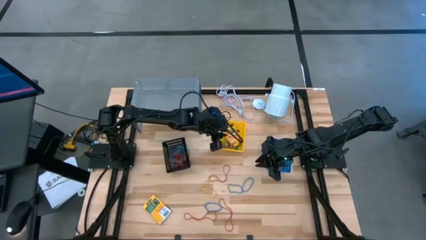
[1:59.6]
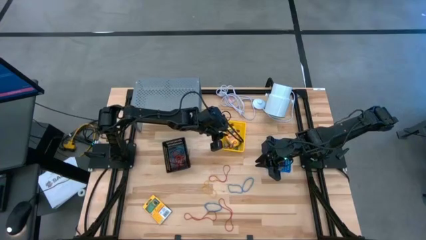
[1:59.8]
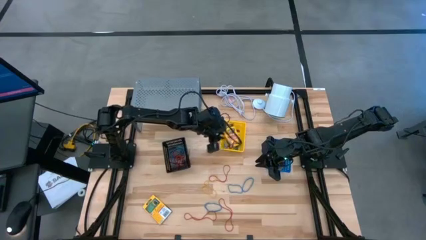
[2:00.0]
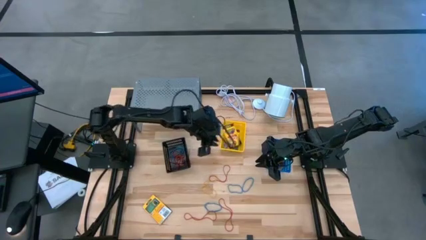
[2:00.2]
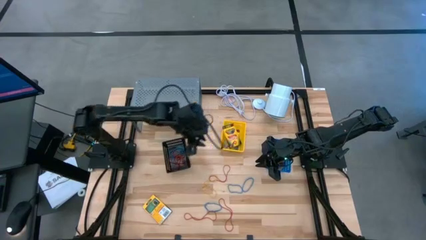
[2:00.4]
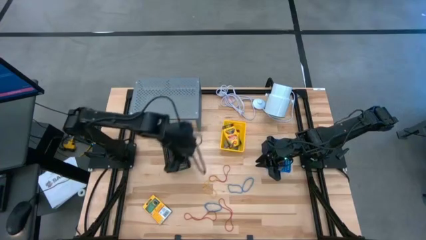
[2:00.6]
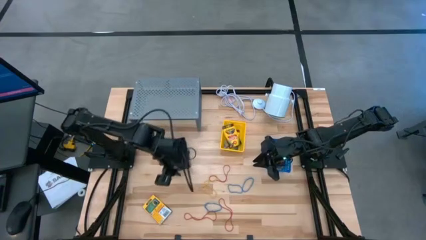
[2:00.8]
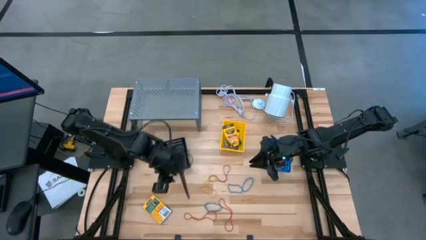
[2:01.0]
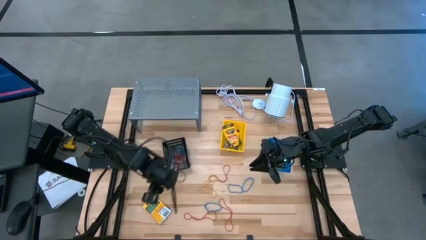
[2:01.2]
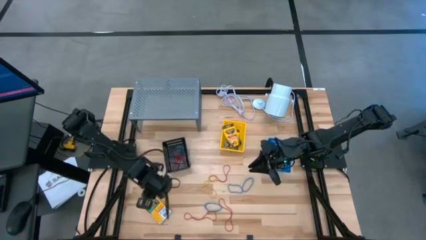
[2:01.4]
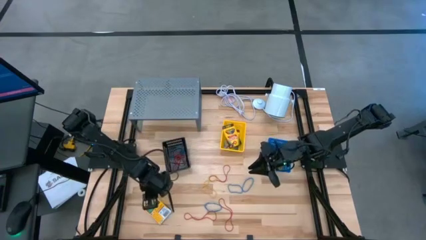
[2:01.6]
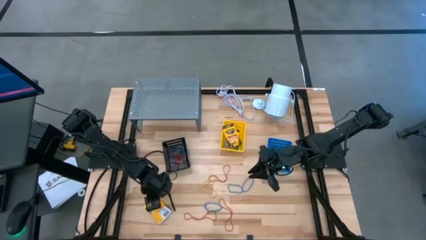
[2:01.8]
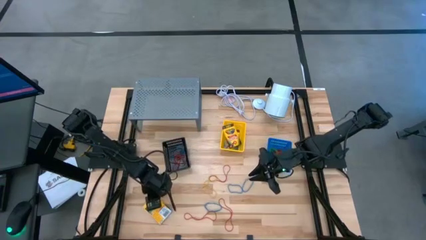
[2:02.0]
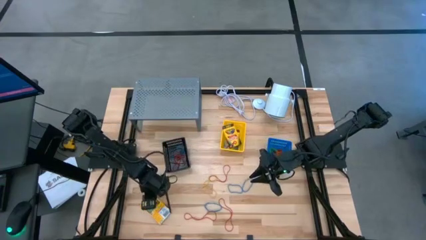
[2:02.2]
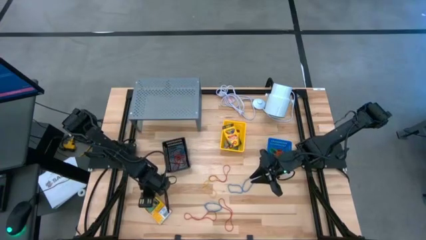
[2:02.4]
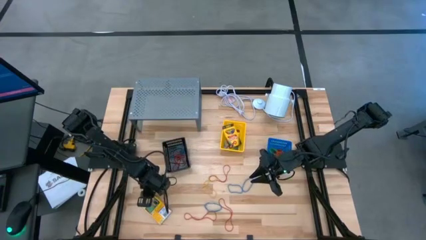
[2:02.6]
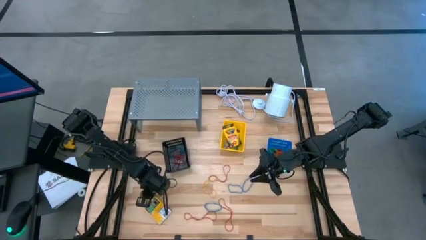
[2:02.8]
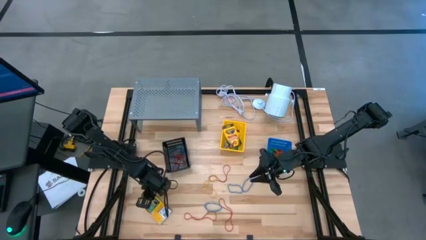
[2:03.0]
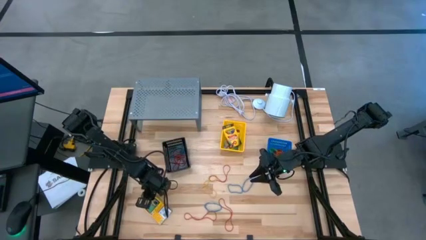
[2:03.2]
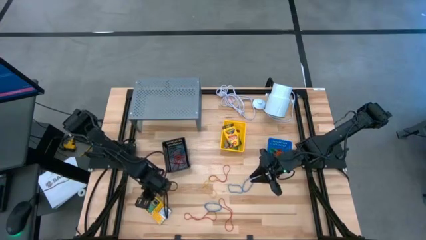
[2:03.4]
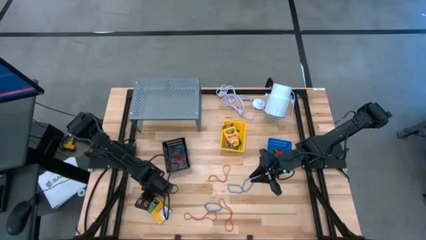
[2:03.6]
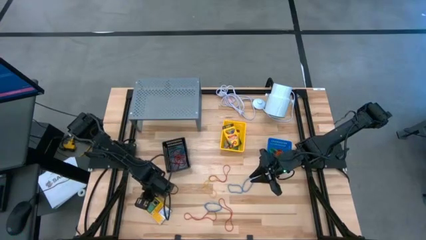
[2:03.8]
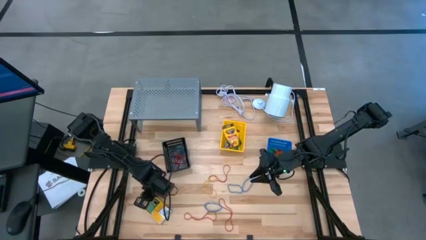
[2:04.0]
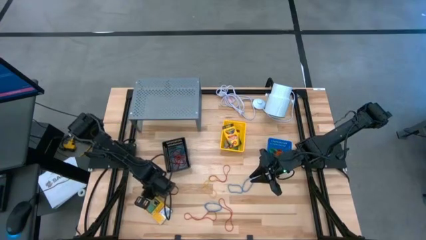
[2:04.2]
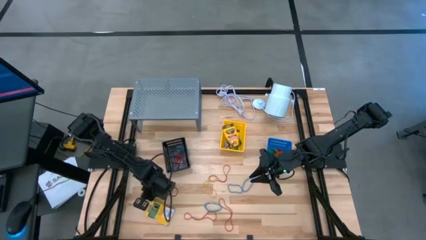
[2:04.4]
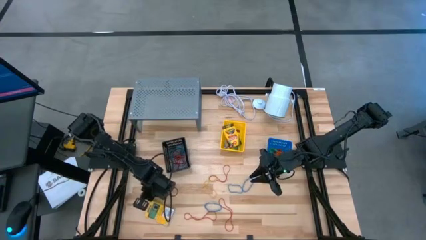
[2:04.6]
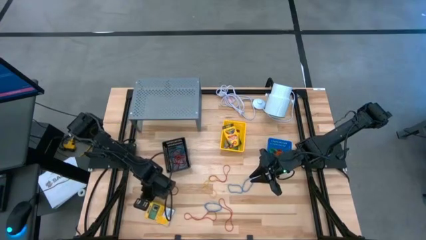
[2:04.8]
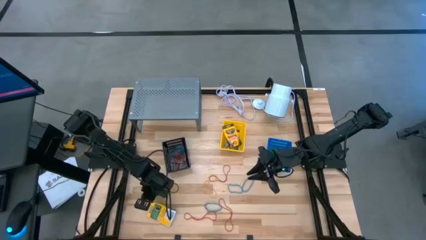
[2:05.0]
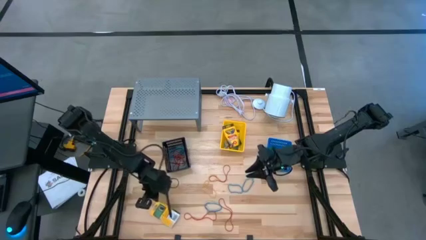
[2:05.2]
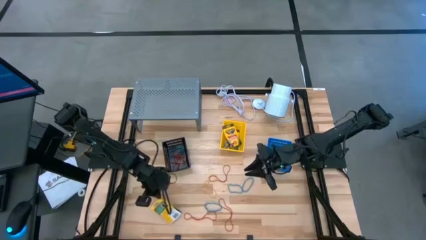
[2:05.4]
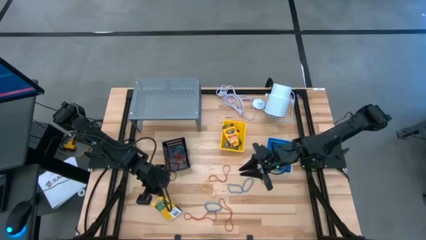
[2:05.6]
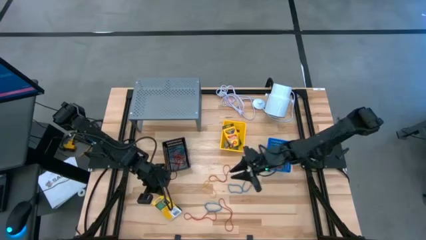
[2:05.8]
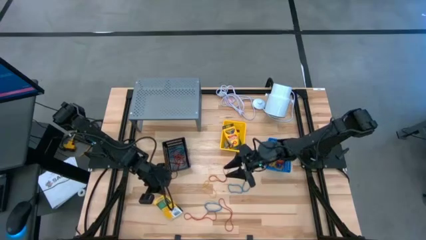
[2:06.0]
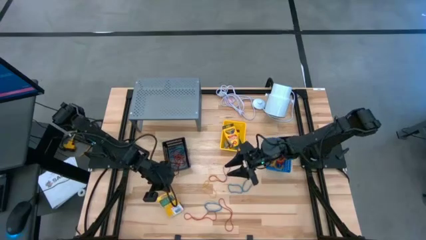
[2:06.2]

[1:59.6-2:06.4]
Task: Pick & Place Office Desk Supplies
Put the yellow crayon box into the yellow bin

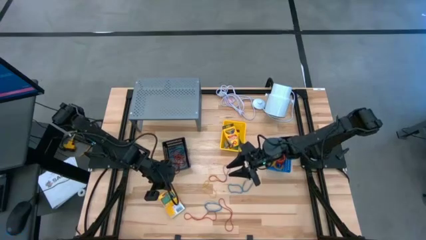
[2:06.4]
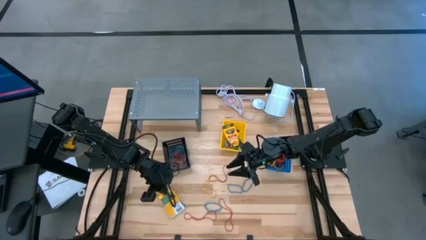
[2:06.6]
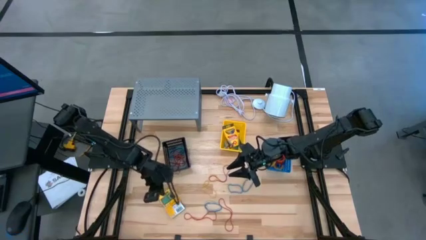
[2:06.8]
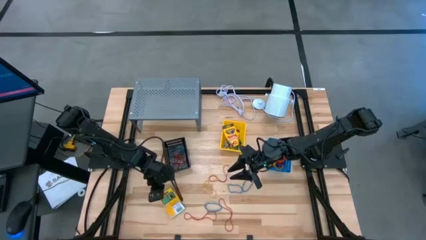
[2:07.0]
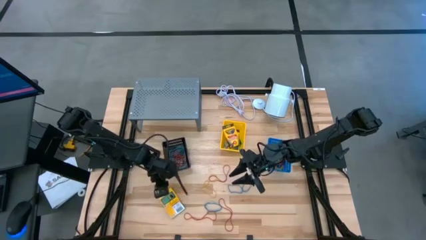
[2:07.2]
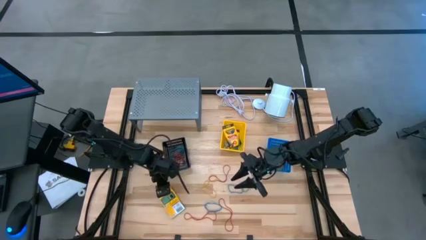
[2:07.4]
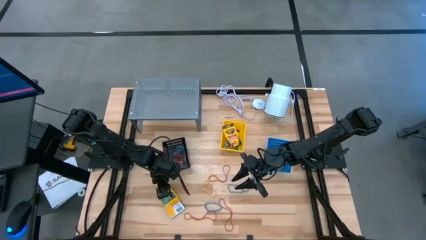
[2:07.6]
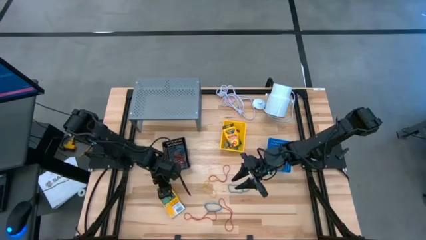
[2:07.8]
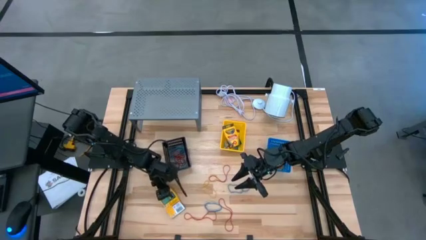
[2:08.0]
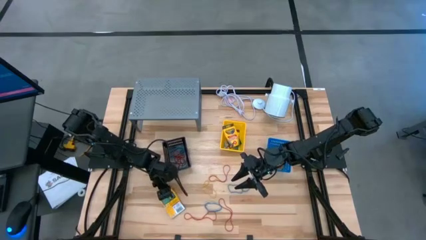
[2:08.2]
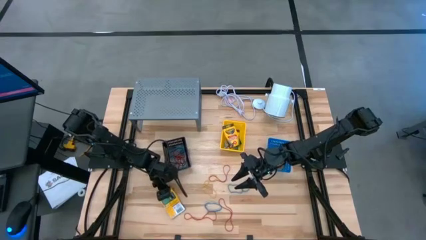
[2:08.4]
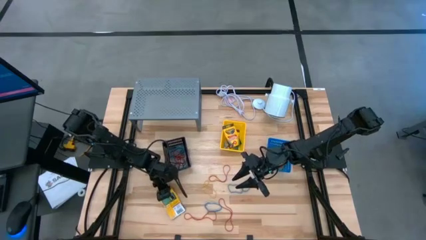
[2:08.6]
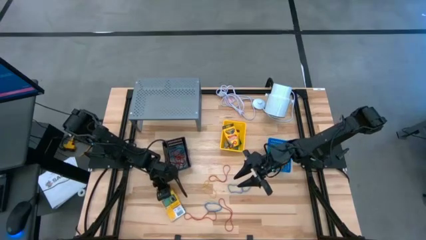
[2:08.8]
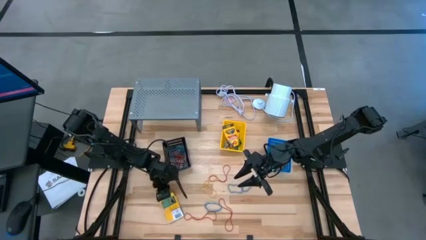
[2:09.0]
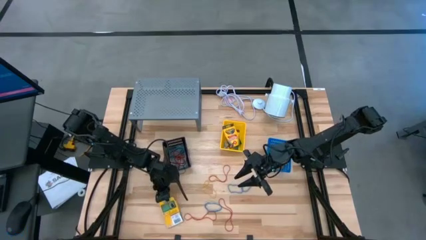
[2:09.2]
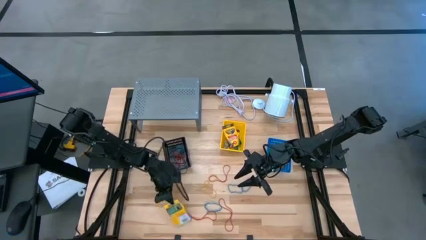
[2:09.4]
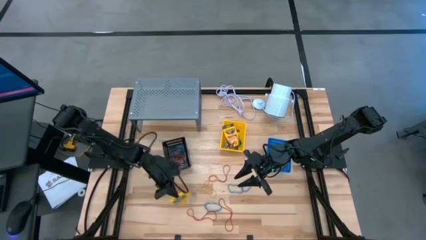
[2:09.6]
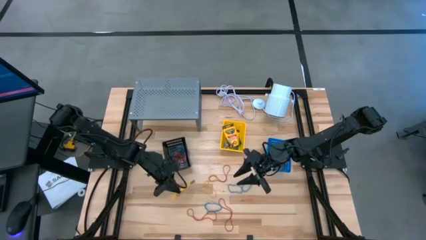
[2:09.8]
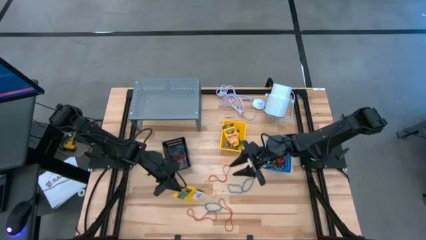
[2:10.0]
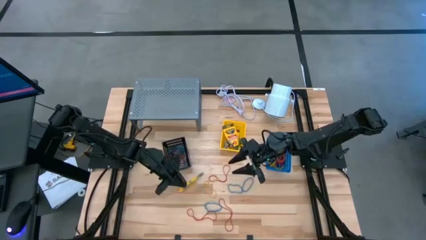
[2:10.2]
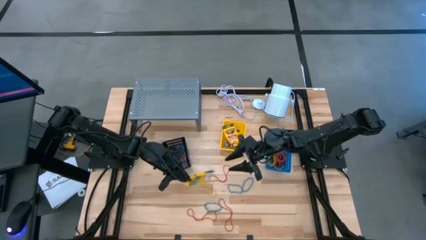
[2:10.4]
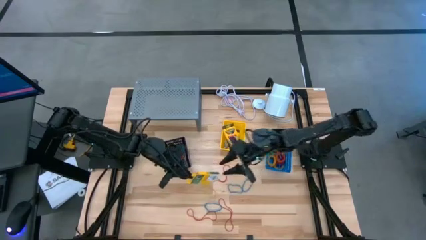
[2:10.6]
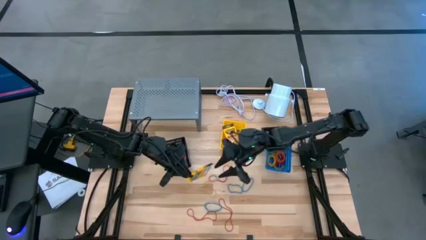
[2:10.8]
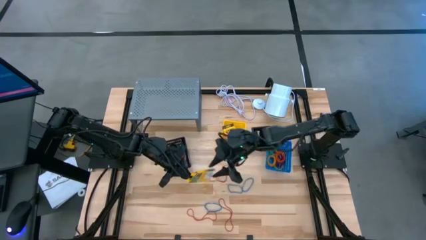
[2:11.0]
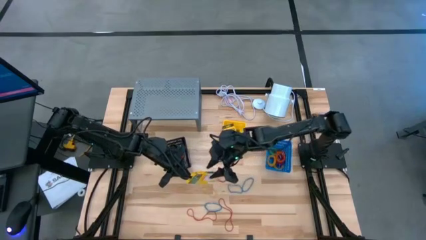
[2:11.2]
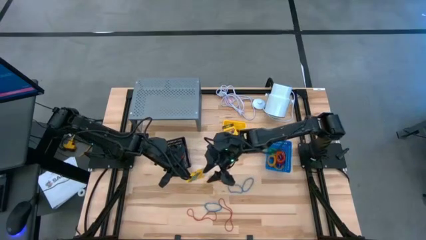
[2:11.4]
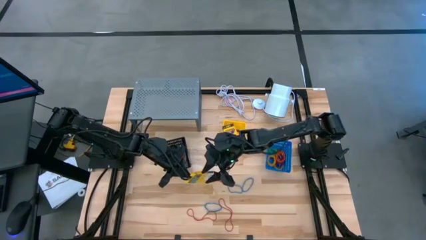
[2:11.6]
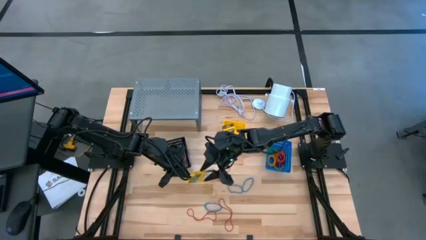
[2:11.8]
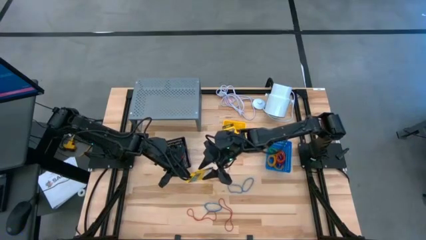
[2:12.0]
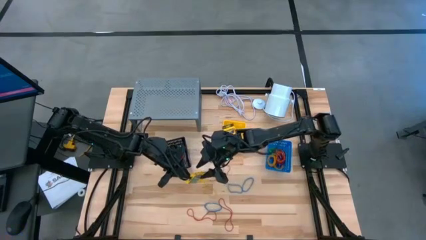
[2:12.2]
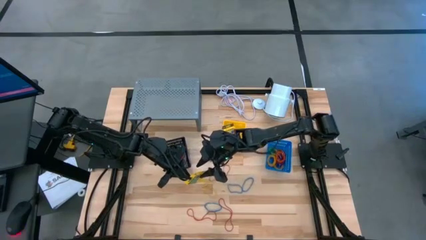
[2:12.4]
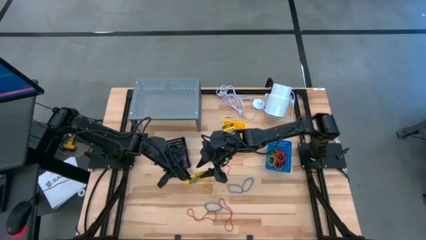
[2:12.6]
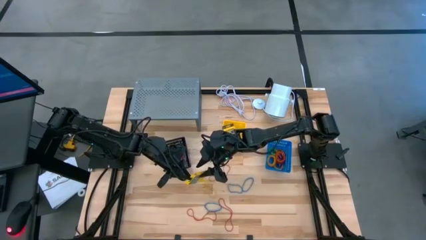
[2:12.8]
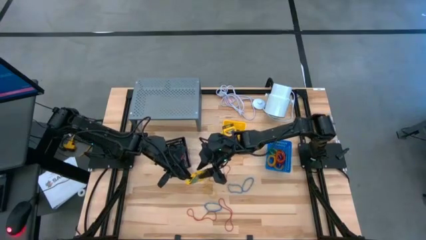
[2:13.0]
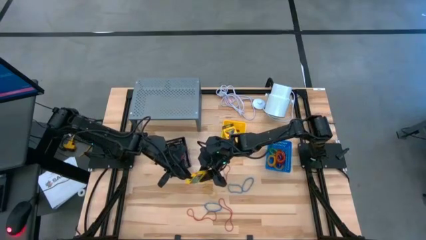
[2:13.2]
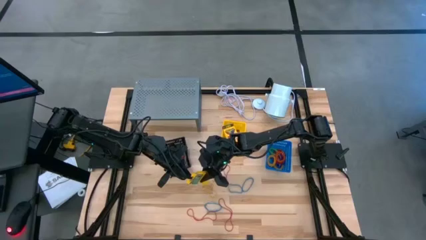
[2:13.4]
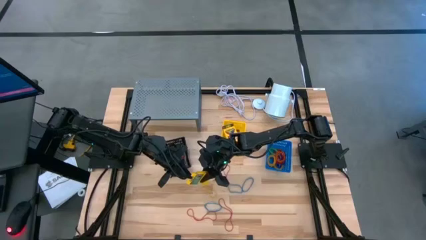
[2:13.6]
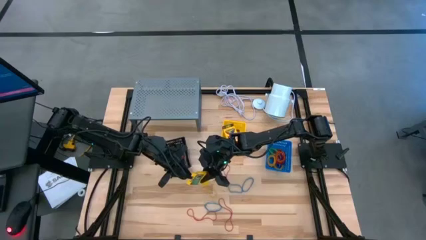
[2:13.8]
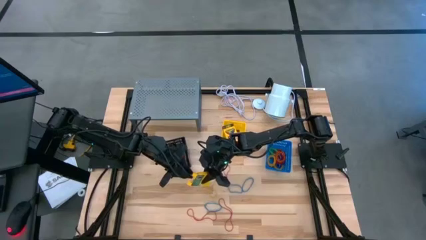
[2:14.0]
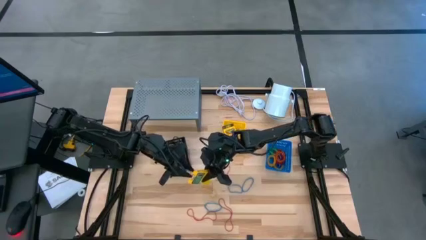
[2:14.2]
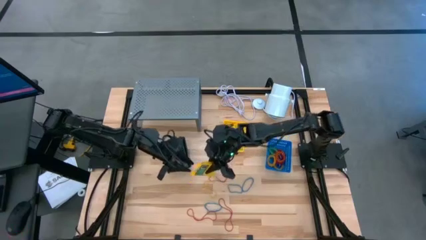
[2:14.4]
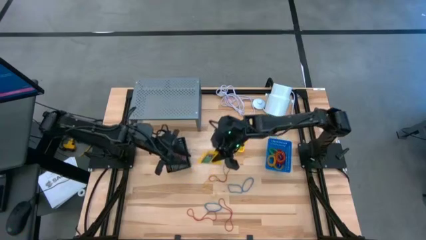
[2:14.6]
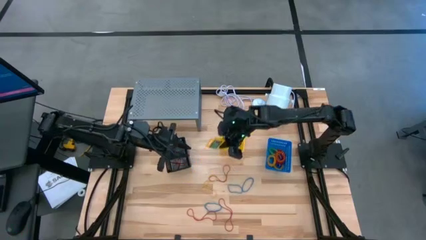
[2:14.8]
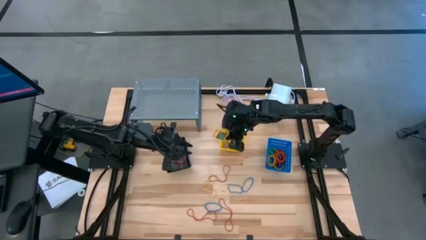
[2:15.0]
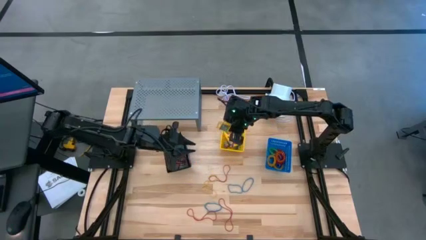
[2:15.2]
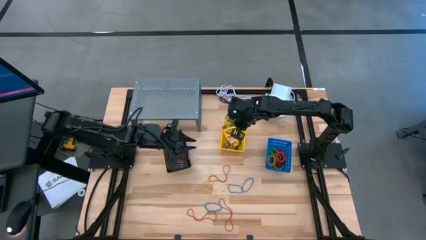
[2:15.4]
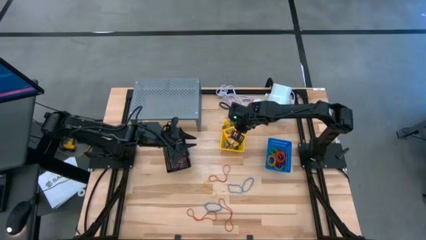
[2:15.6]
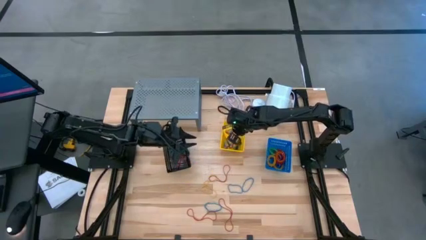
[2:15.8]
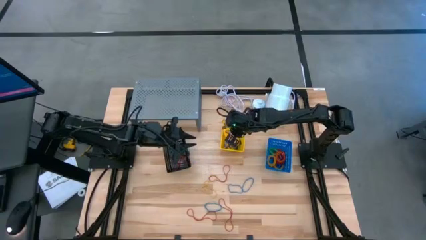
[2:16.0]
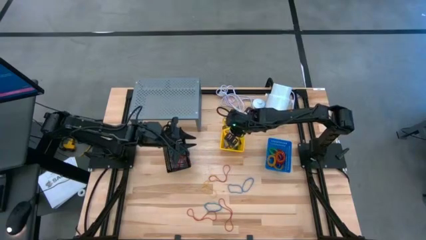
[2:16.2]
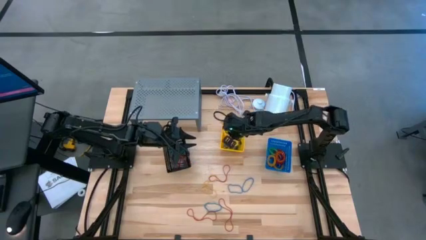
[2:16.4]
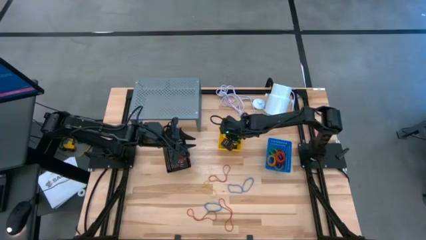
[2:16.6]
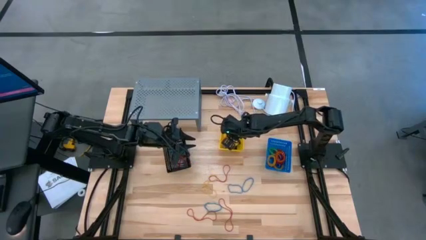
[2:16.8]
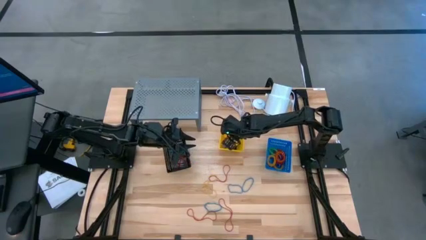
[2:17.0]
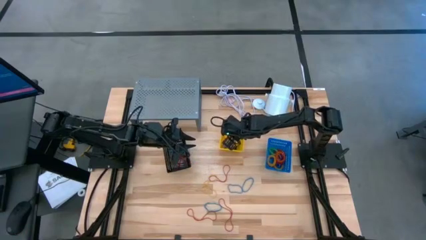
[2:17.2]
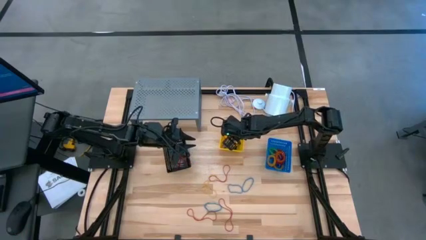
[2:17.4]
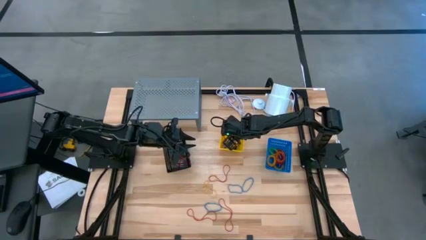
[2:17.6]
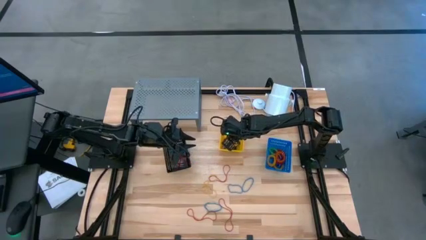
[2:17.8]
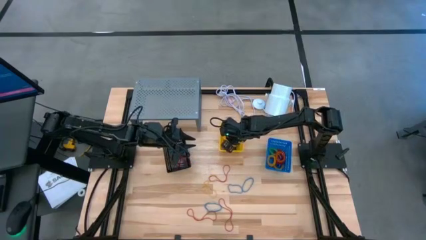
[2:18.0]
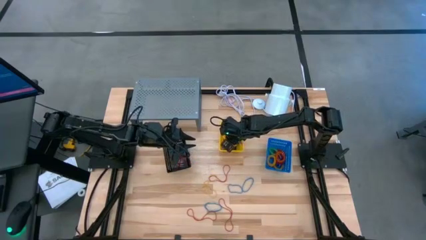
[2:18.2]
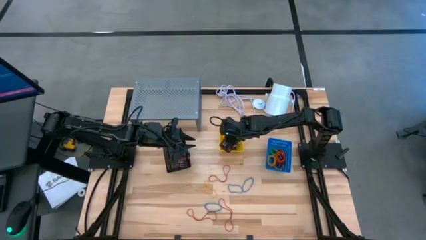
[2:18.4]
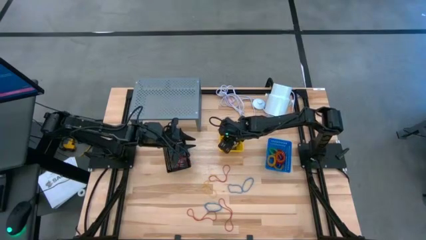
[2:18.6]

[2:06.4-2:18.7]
Put the yellow crayon box into the yellow bin
